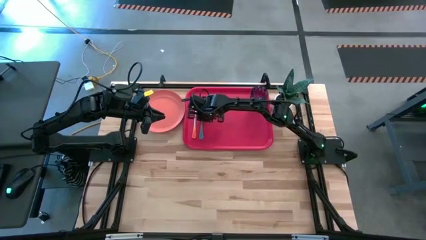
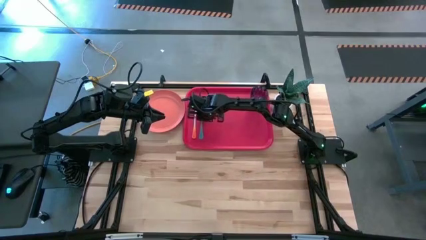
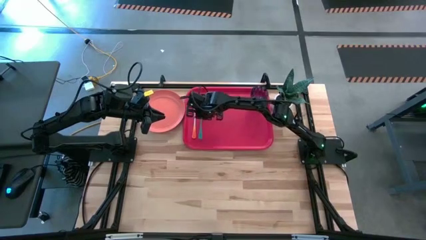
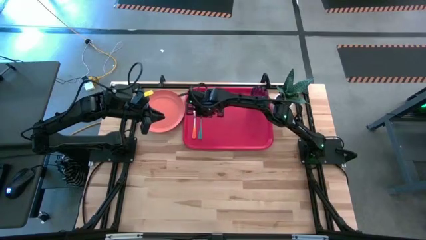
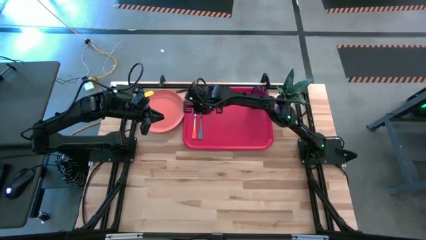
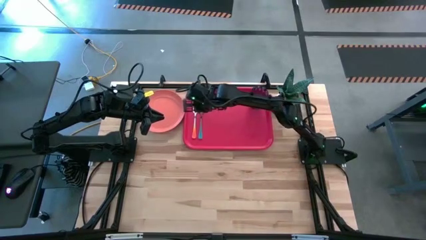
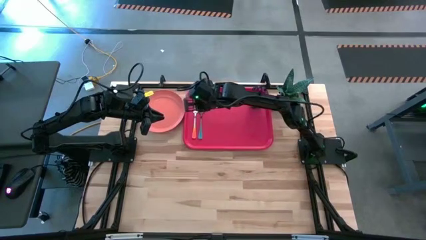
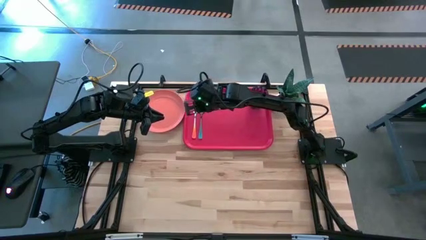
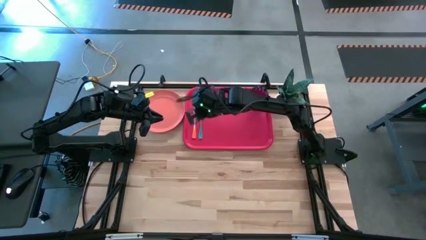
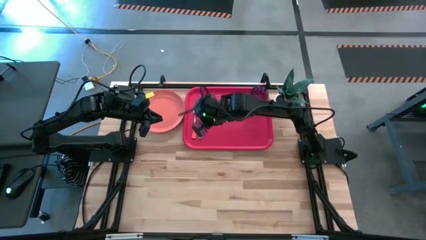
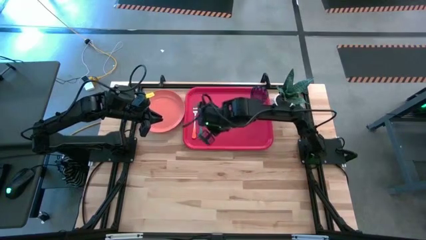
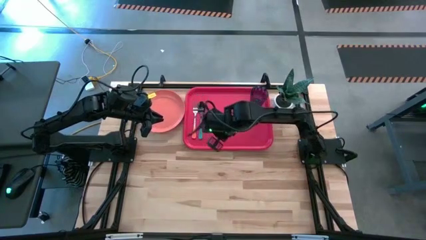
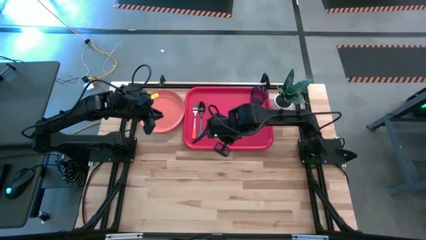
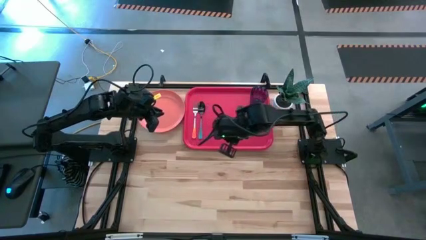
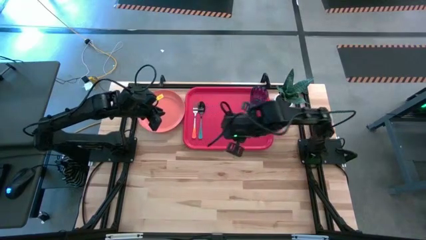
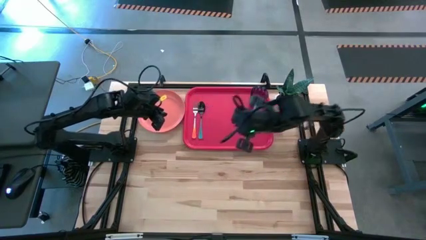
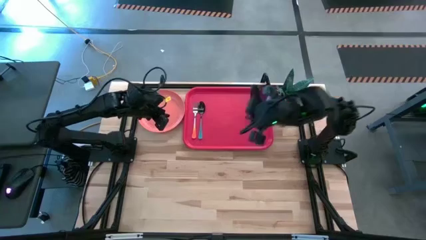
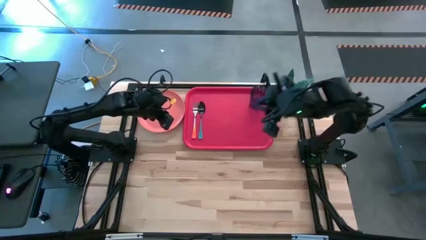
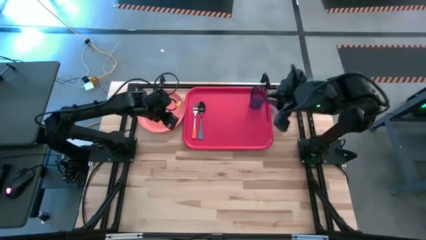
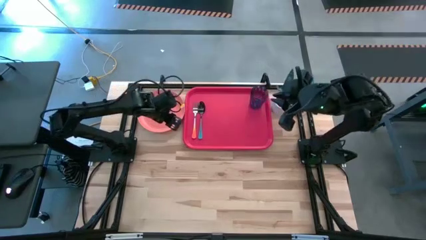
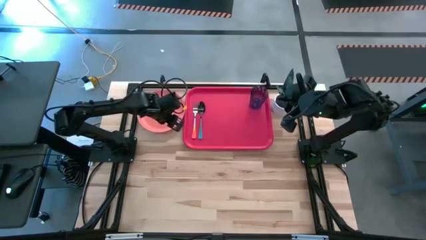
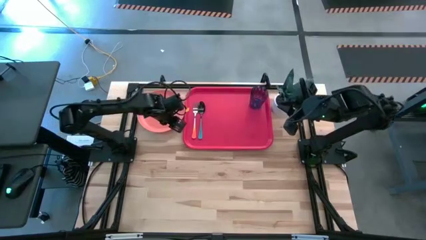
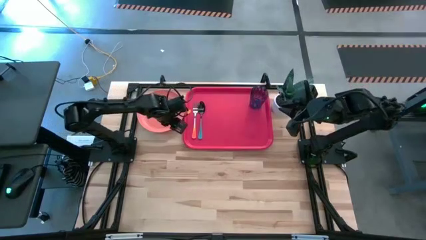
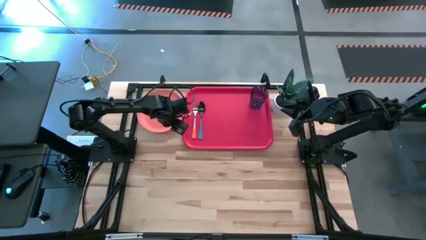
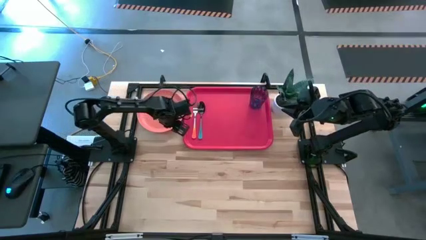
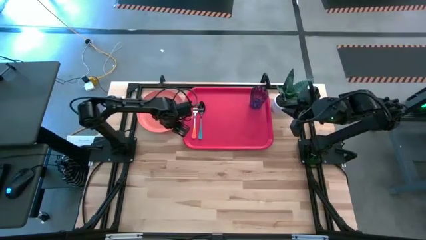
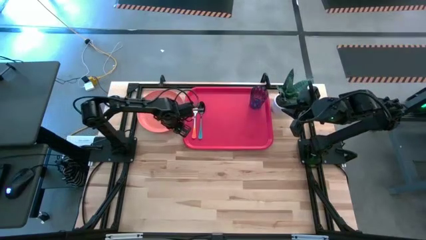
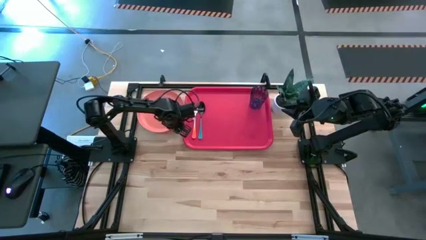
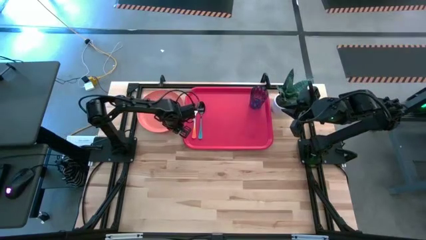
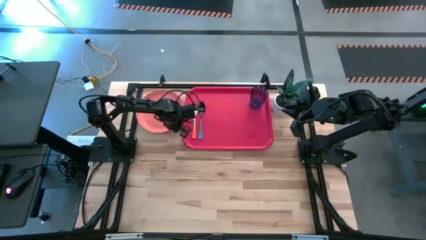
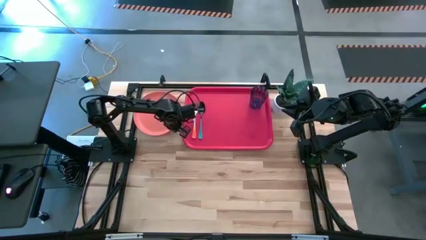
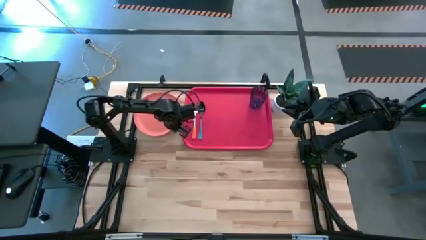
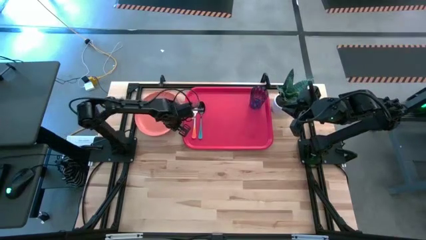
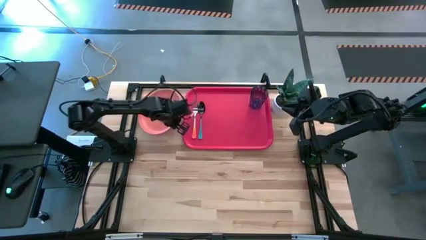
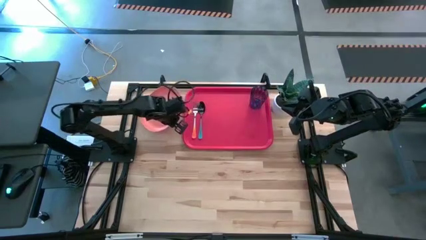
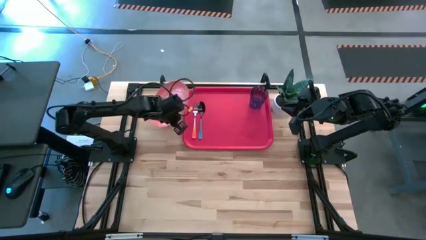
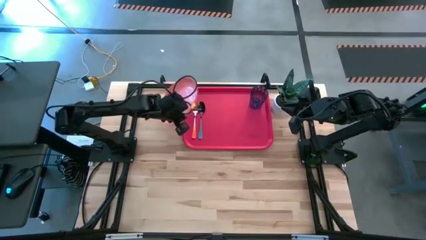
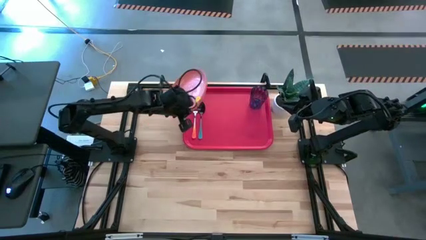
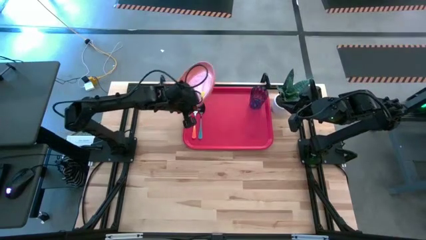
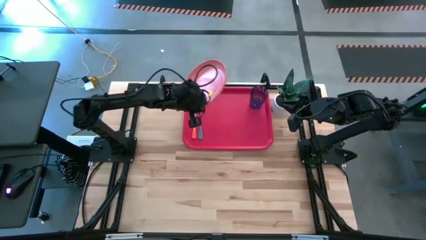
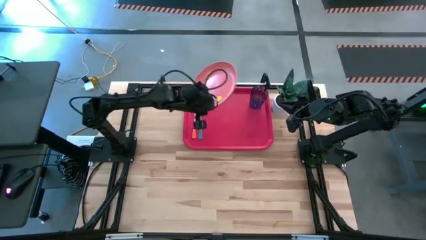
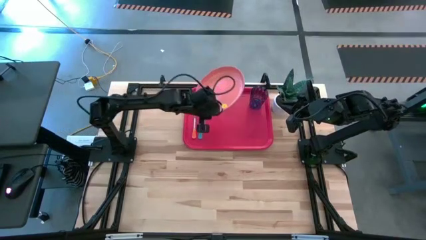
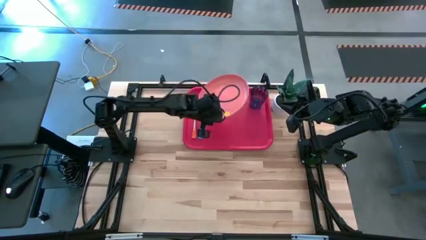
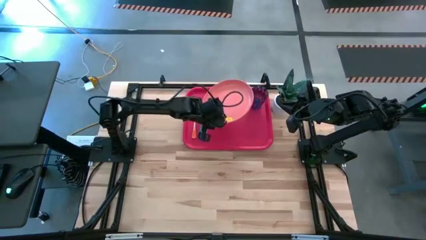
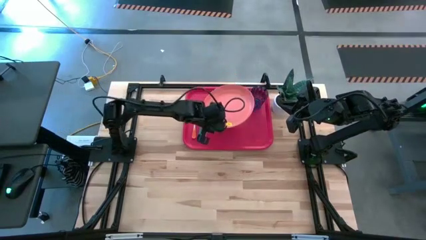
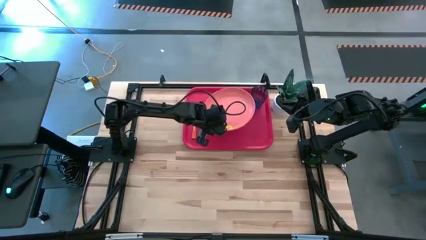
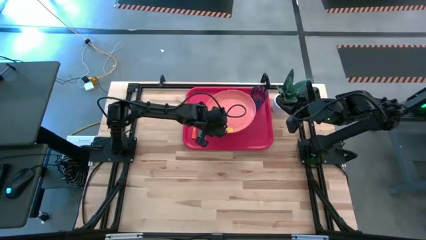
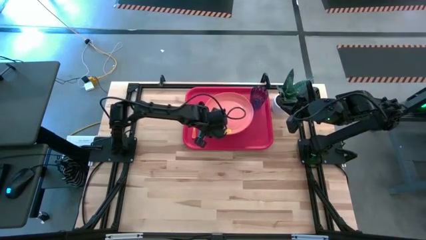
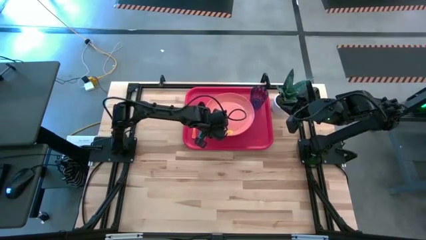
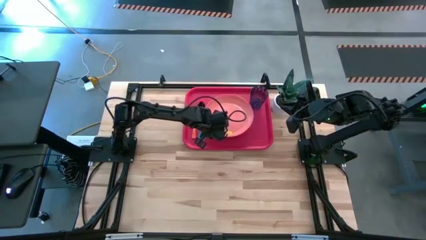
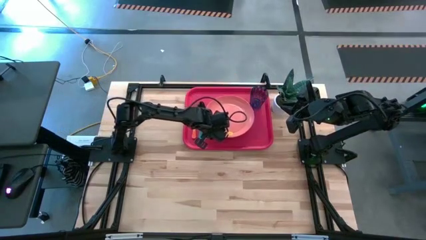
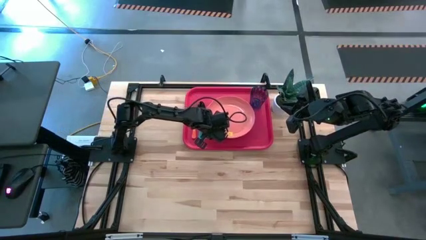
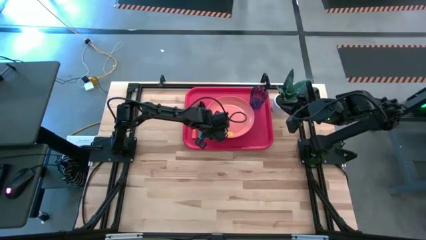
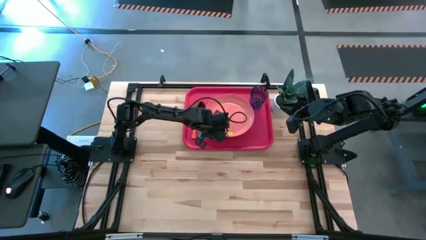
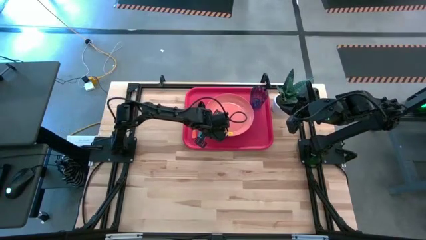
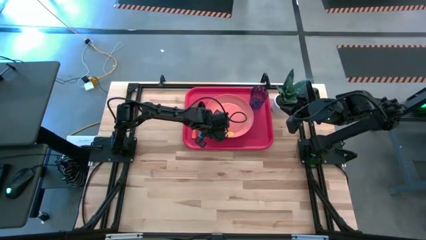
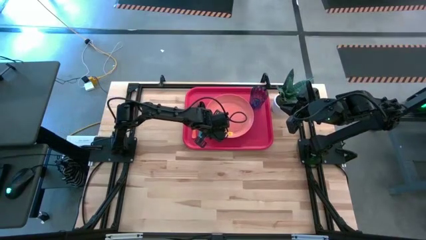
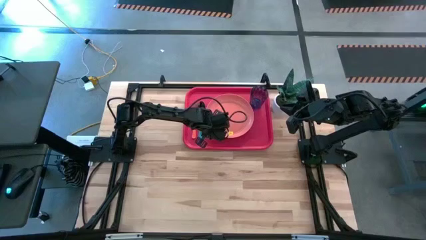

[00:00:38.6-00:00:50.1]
Task: Pick and place plate/cup/fork/spoon on tray
Put the plate on the serving tray to the right of the spoon

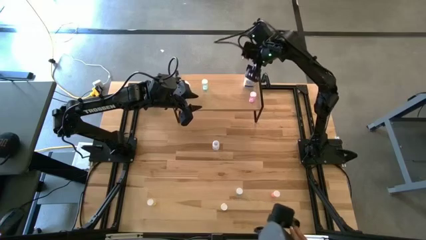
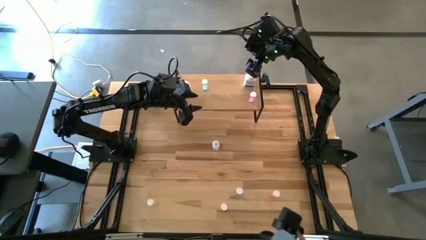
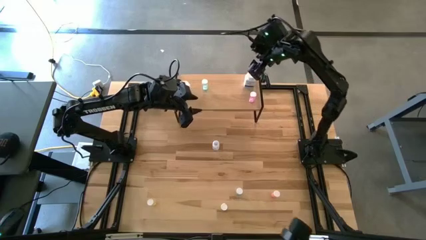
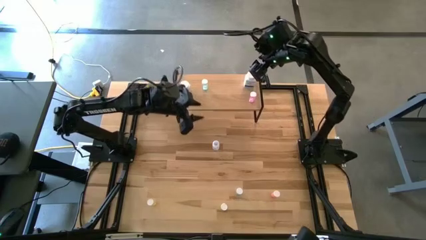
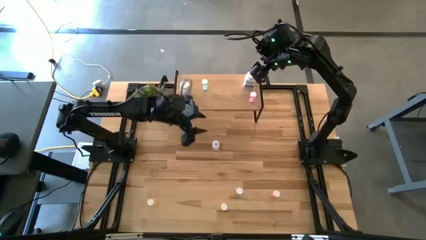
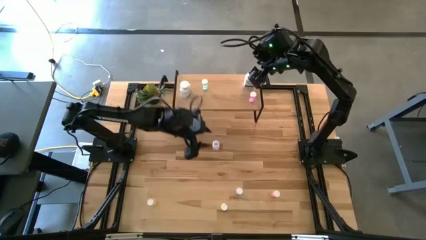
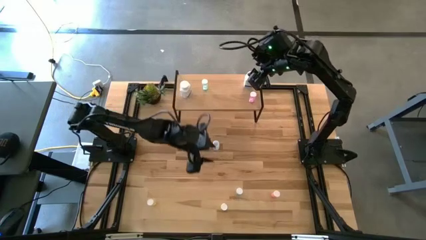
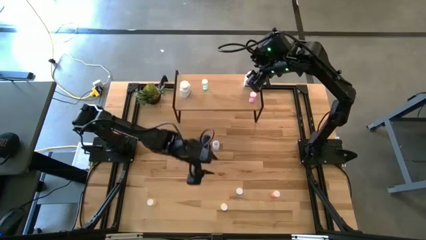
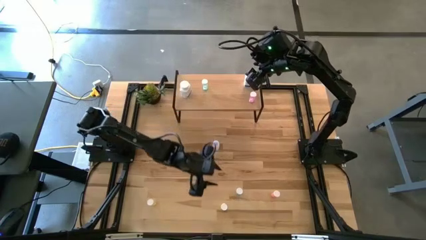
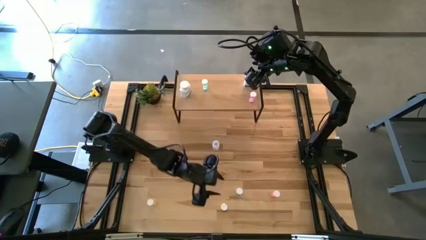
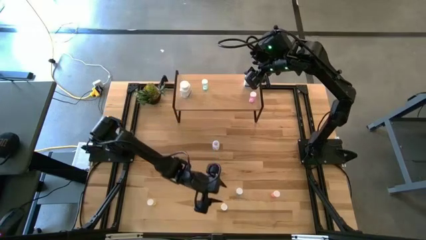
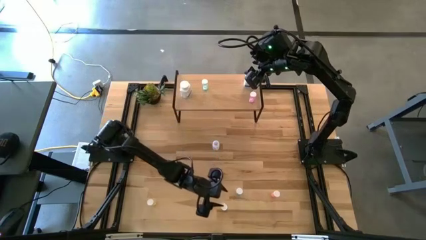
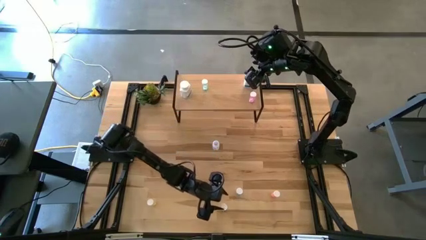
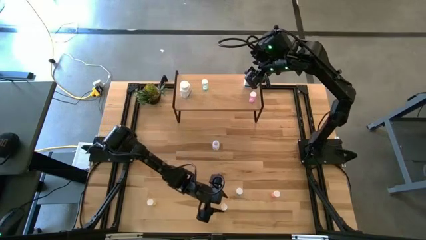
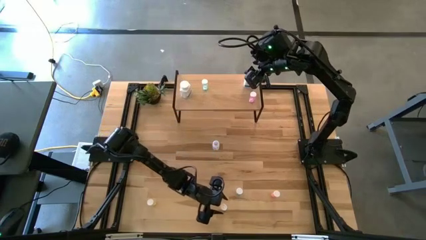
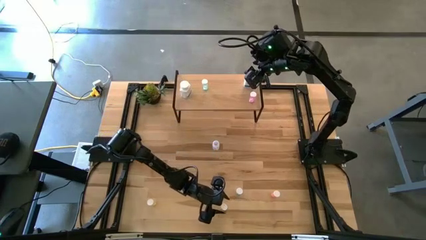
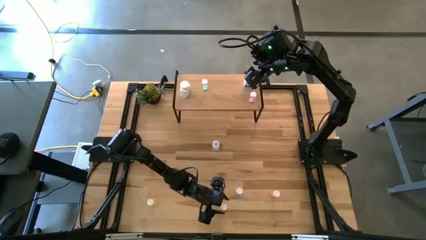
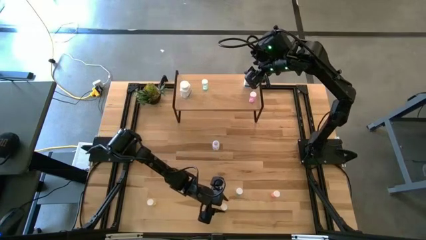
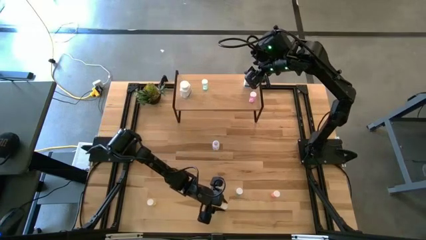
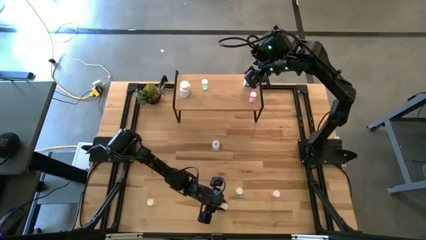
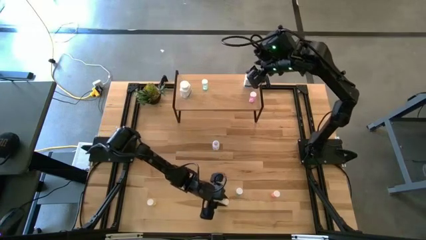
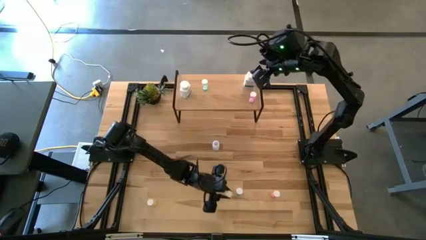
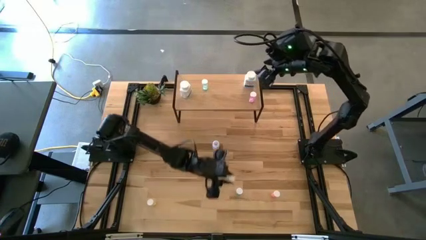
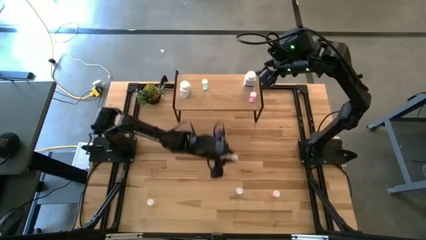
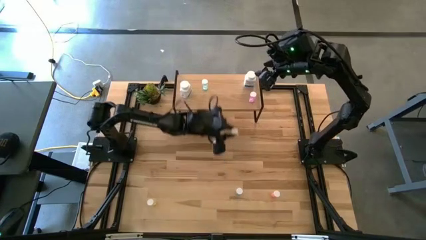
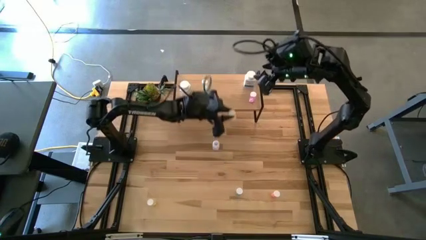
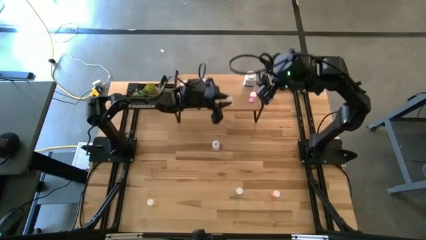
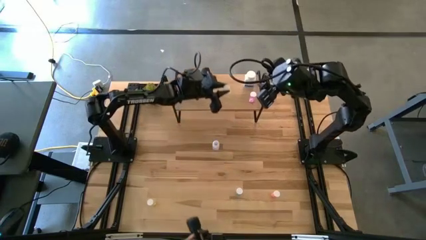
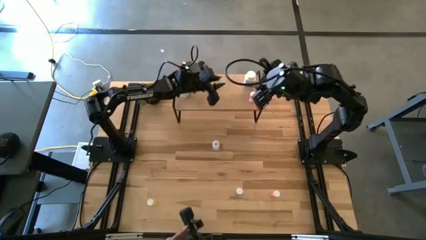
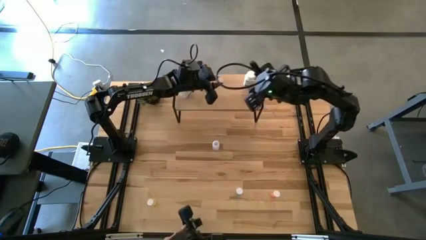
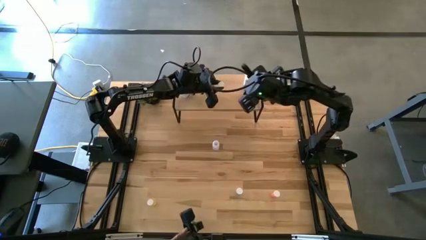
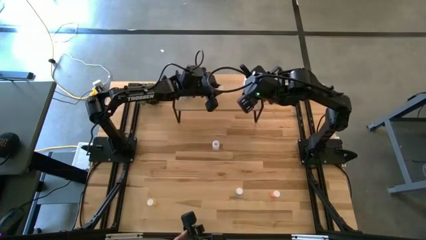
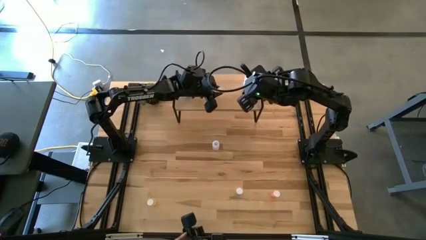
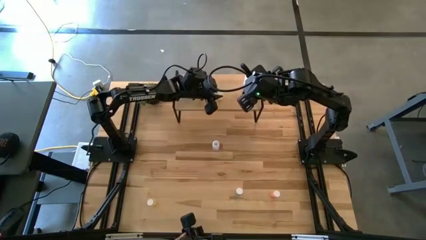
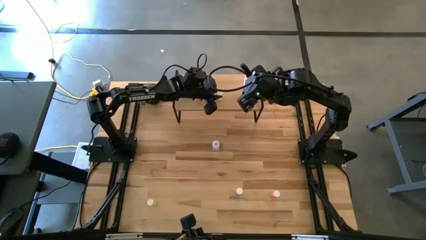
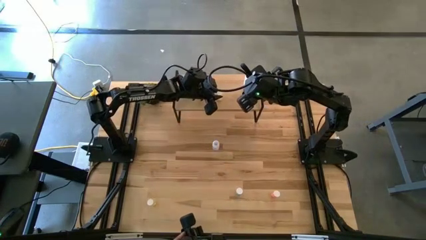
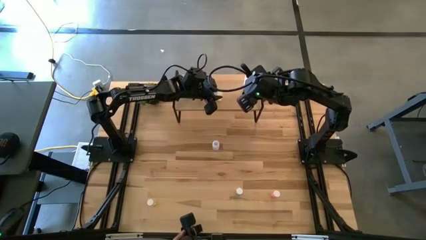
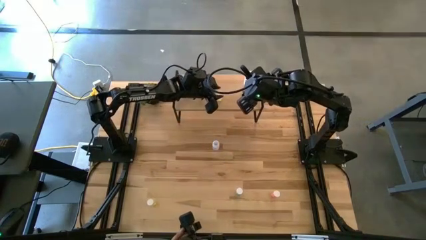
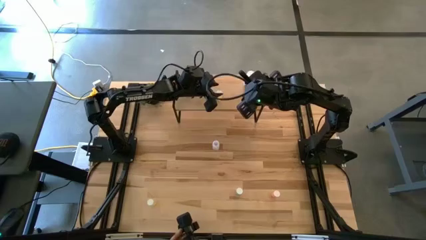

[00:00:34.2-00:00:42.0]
Task: Pick and place medicine bottles onto shelf by color
Put the right yellow pill bottle on the shelf
